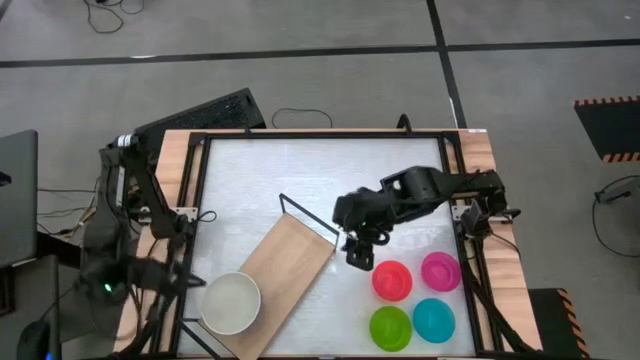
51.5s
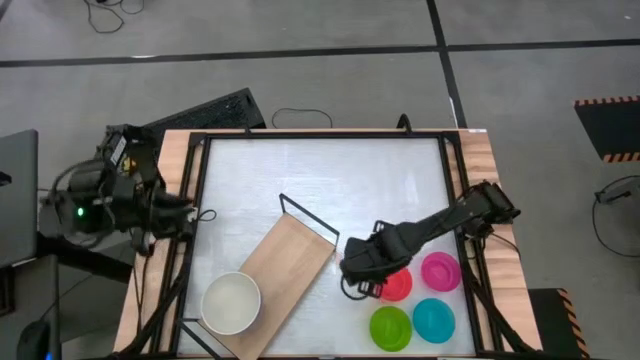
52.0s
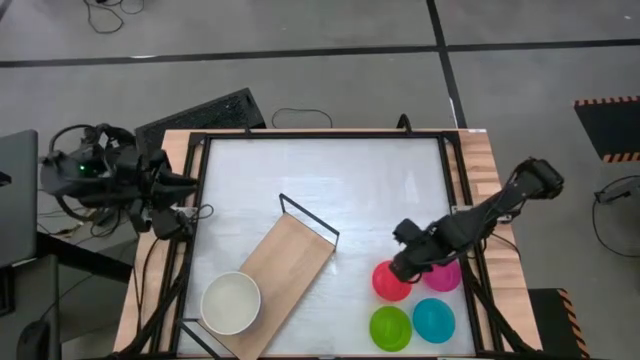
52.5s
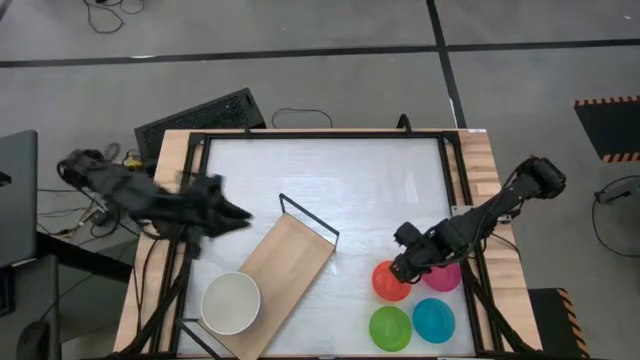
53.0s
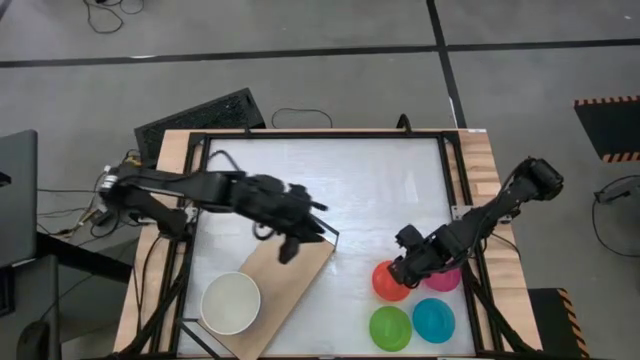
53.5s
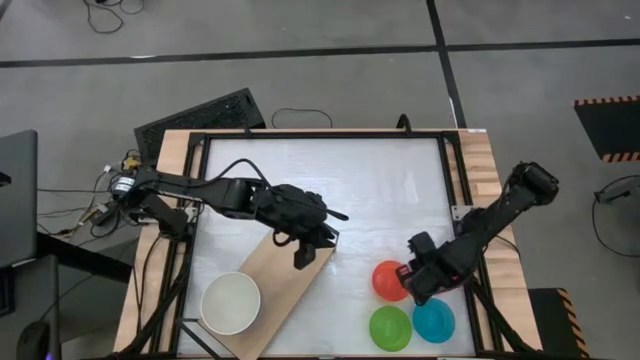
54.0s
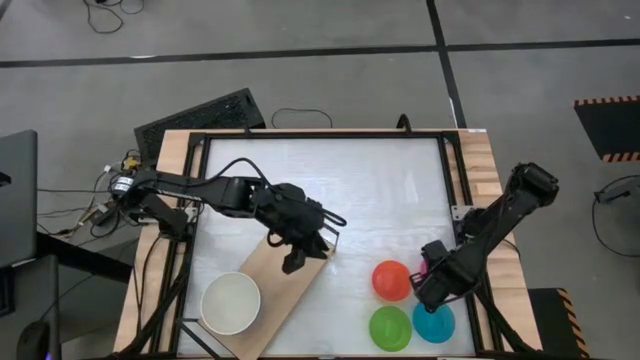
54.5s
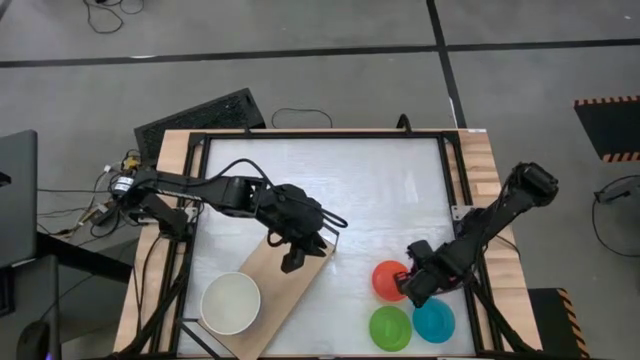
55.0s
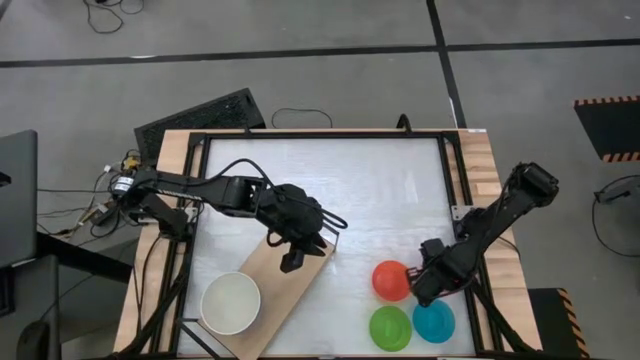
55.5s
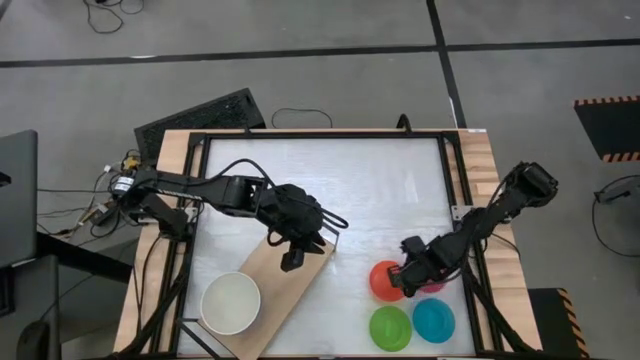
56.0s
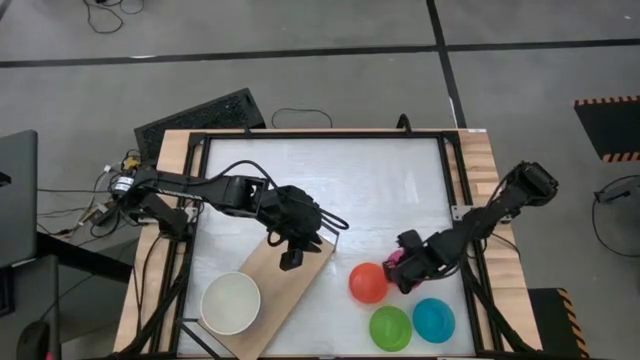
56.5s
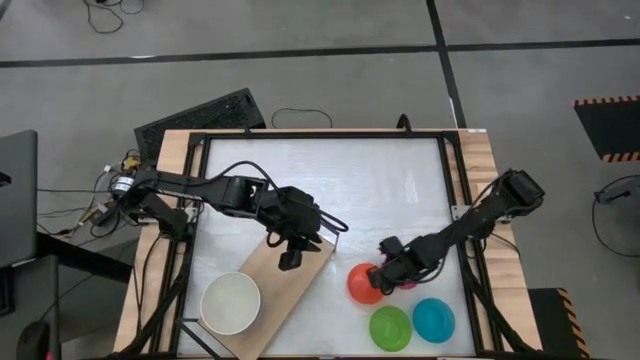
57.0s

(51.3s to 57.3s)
Task: Place and stack bowls onto a shelf
Adjust the colored small bowls

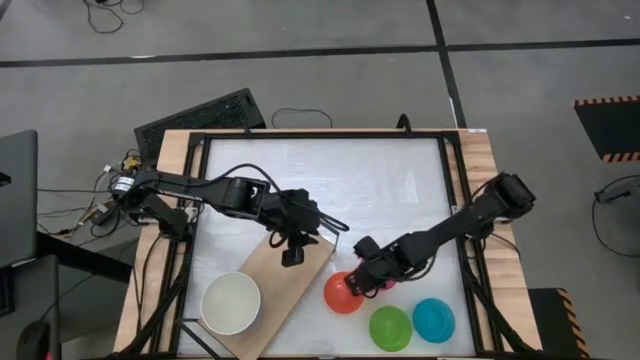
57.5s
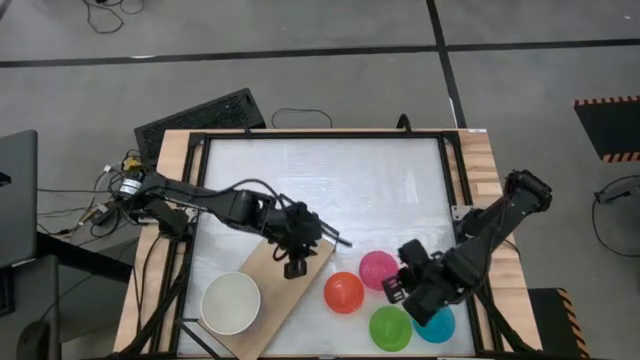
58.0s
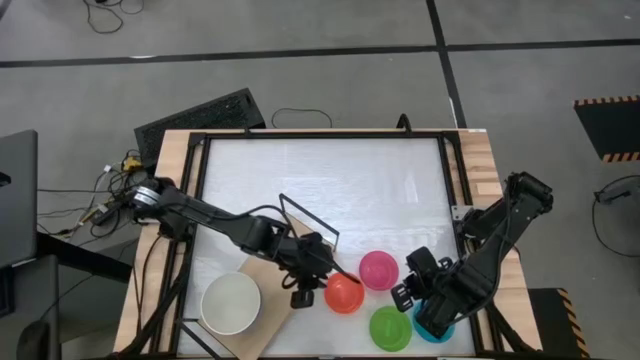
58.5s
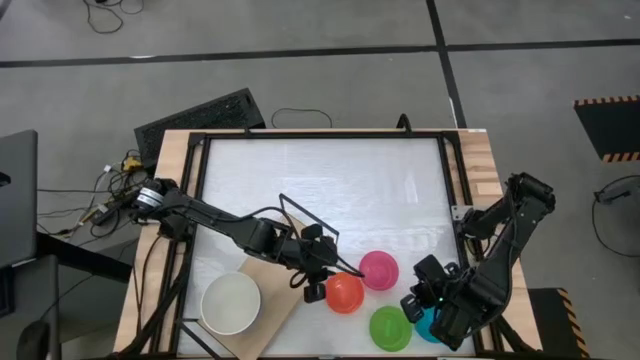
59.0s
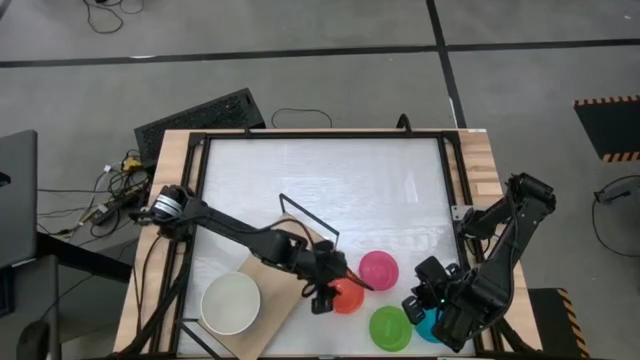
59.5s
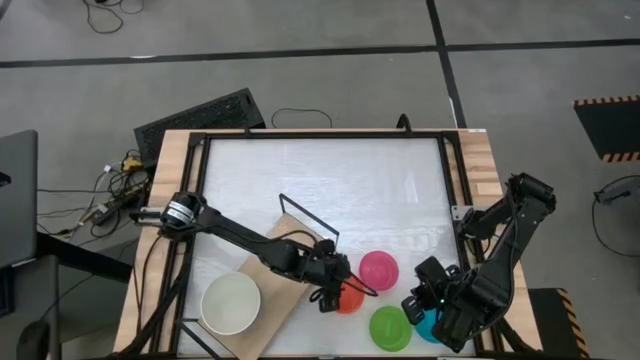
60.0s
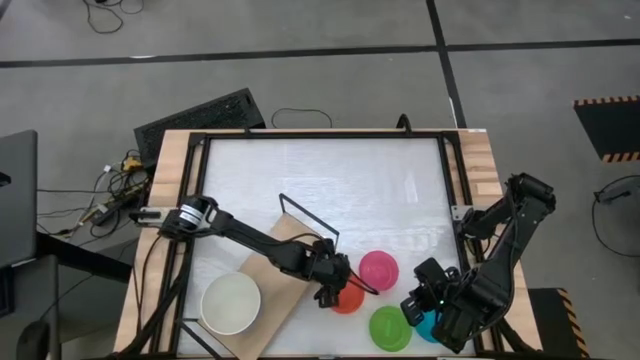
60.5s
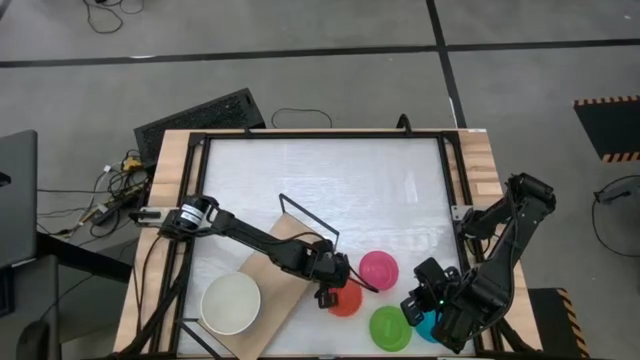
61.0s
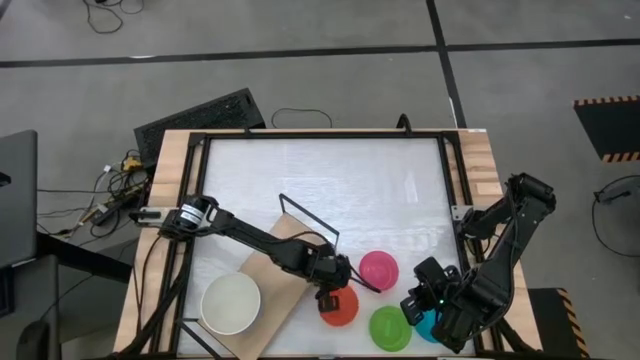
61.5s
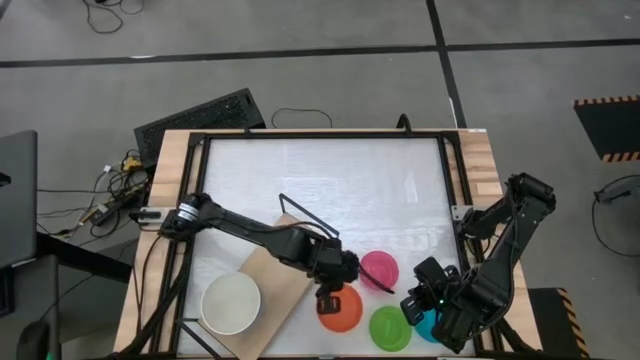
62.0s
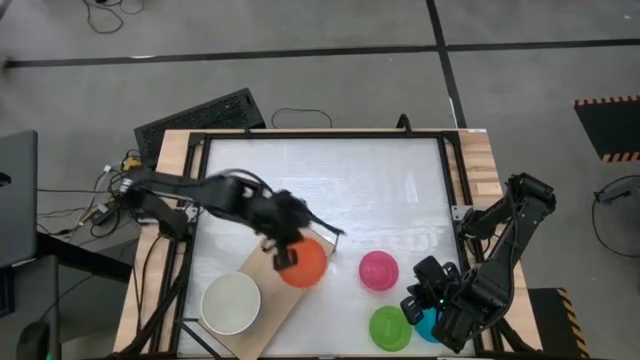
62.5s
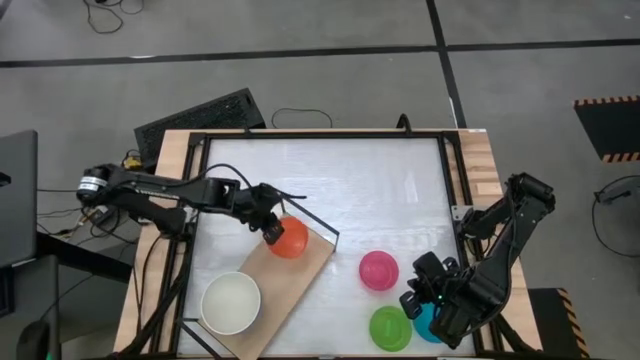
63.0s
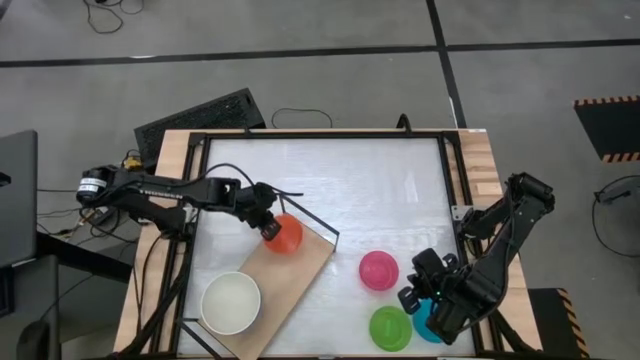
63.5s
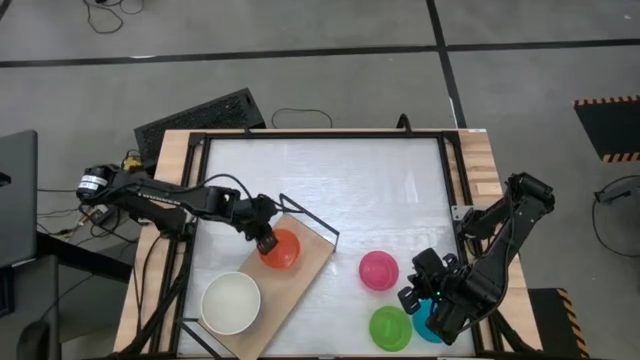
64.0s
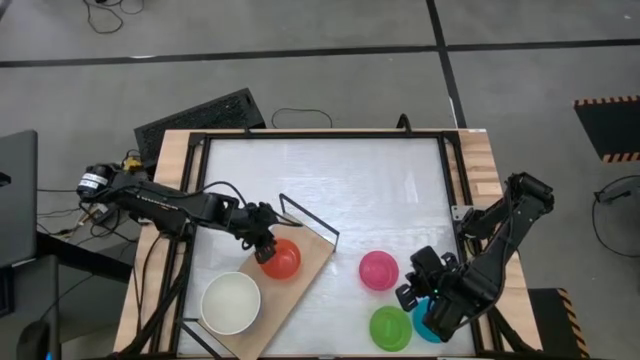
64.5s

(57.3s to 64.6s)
Put the small orange bowl on the shelf

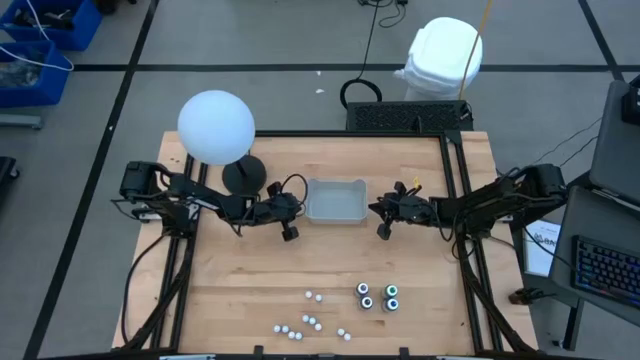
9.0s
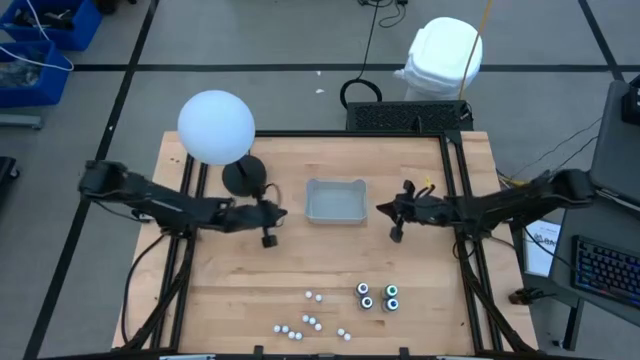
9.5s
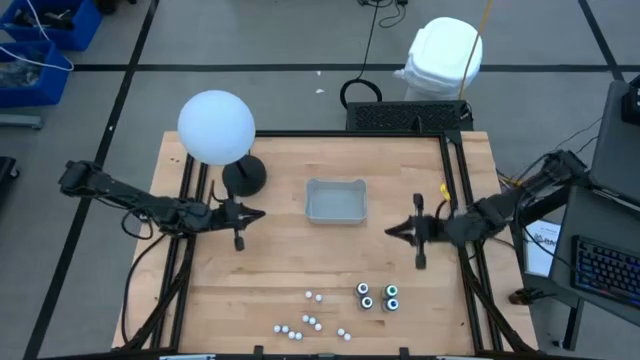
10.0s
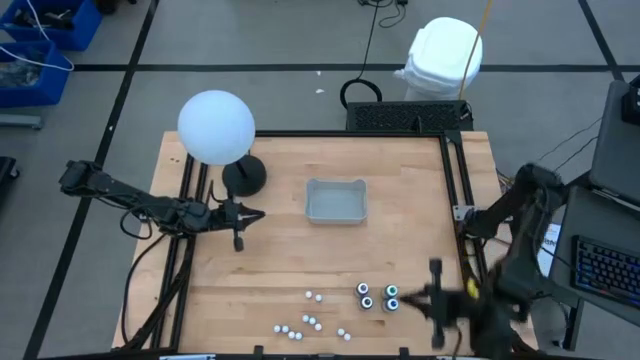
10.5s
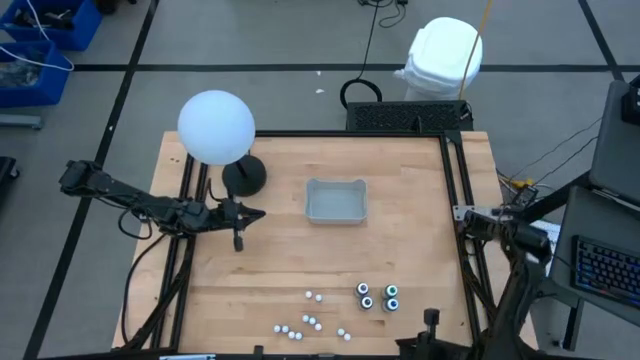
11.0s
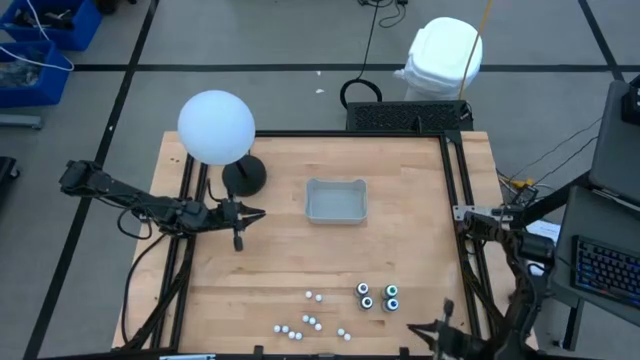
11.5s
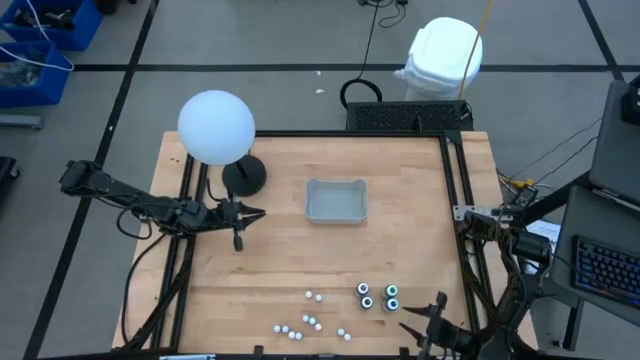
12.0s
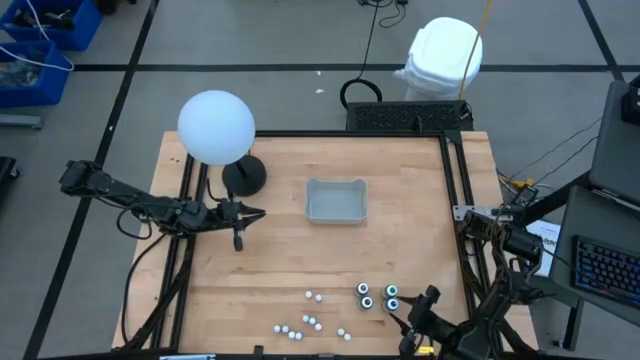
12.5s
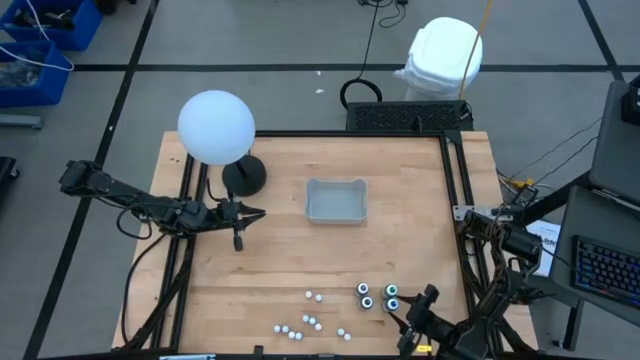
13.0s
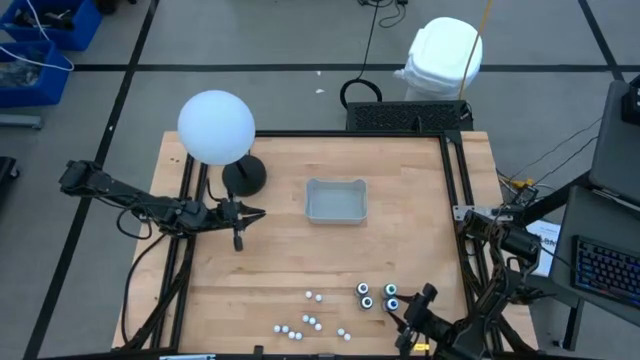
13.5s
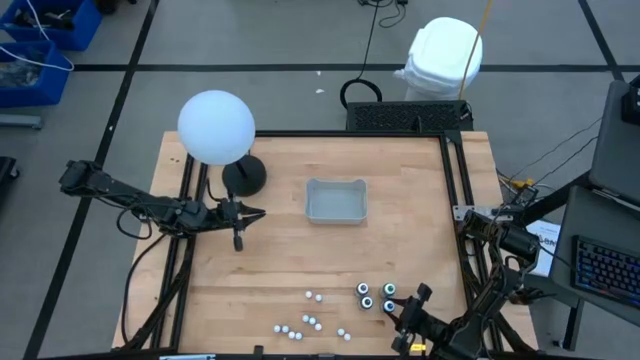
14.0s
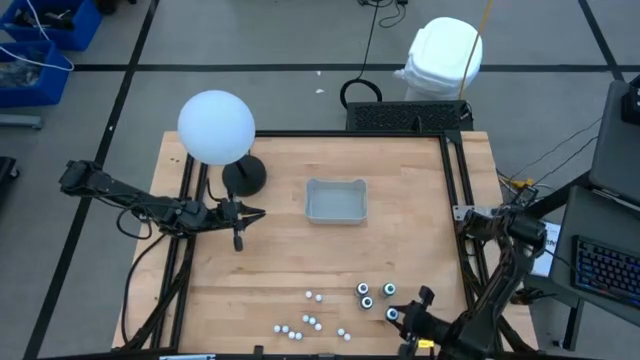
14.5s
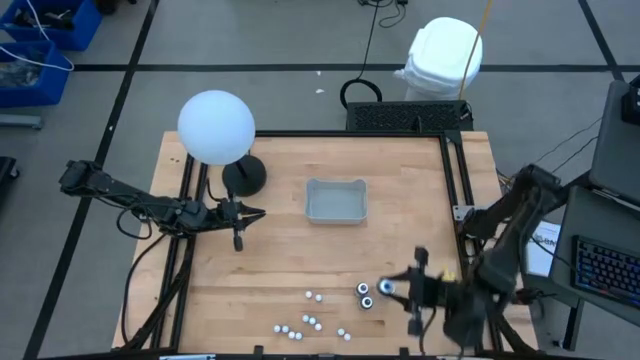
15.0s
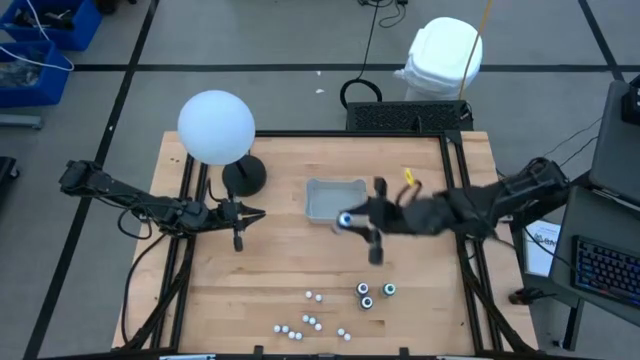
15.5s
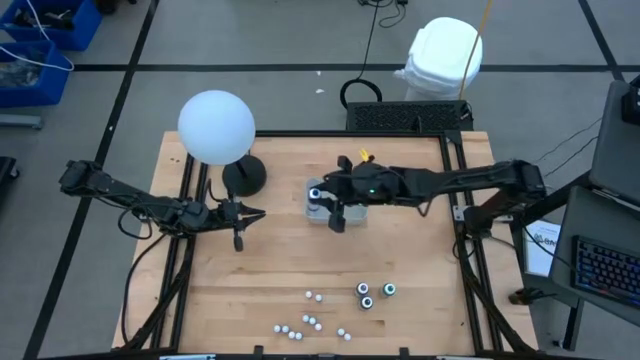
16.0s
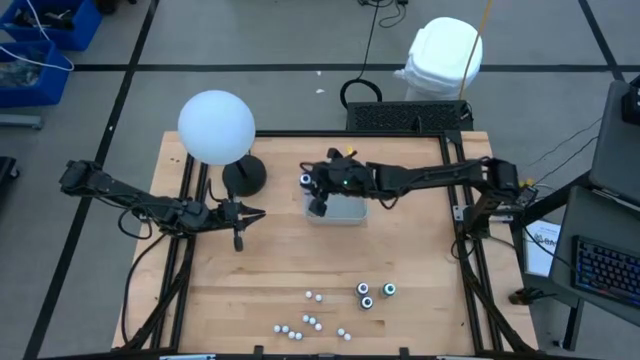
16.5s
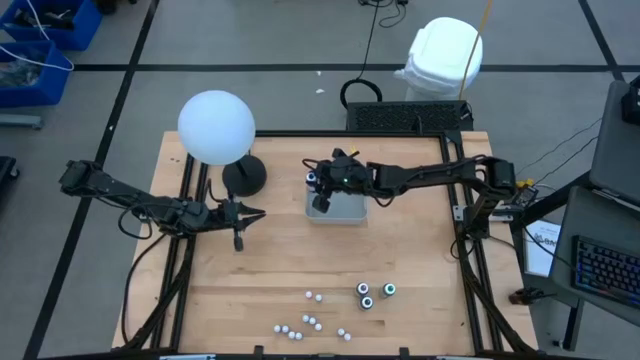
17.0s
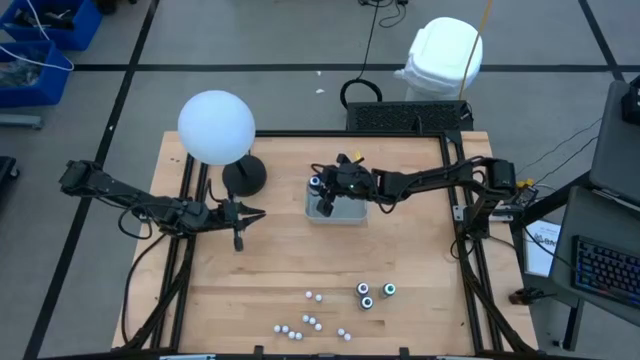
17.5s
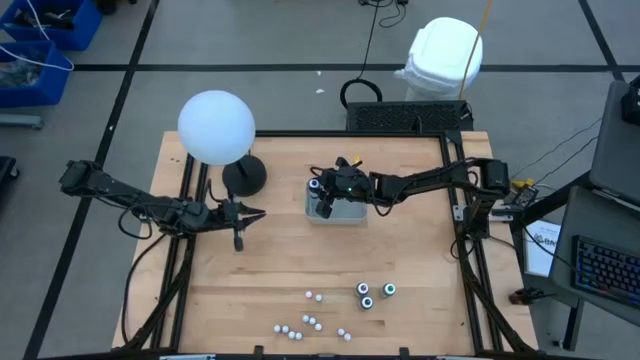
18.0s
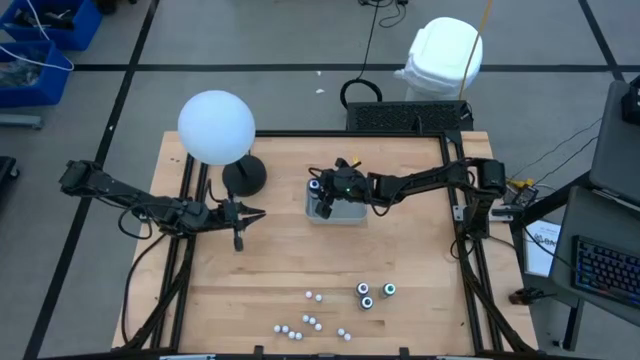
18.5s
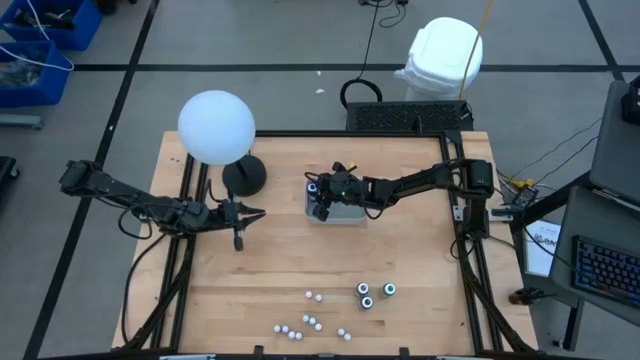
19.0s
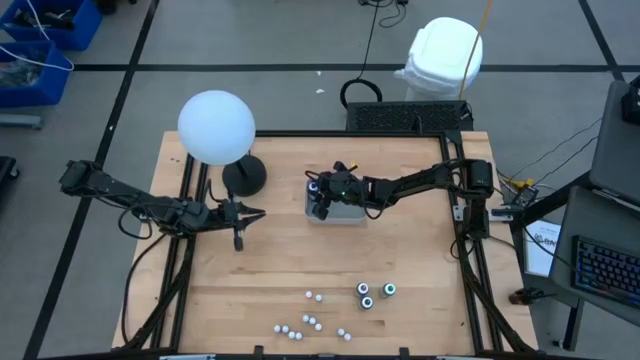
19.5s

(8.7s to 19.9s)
Task: Pick & Place food coloring
Put the big blue food coloring bottle into the gray bin
